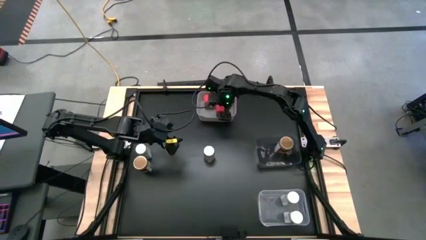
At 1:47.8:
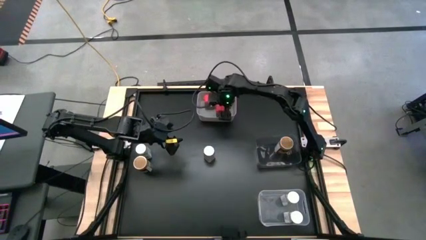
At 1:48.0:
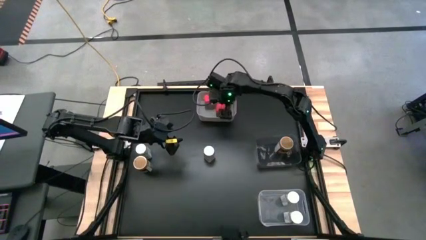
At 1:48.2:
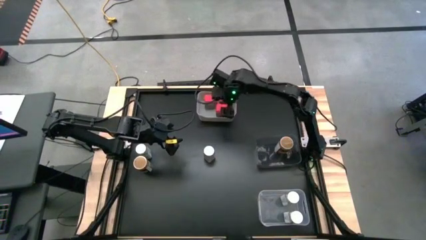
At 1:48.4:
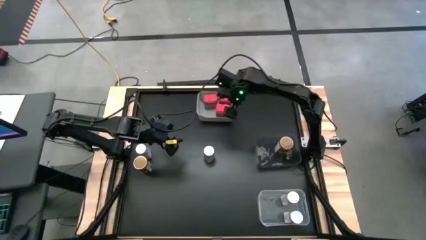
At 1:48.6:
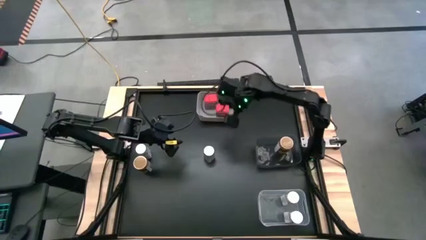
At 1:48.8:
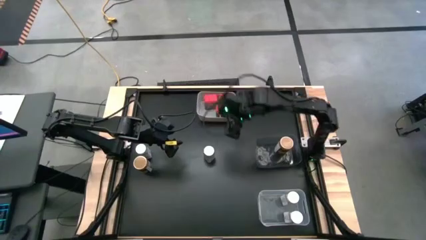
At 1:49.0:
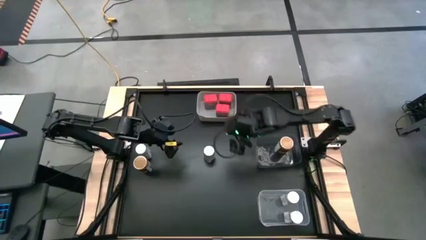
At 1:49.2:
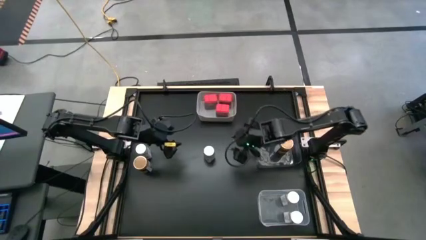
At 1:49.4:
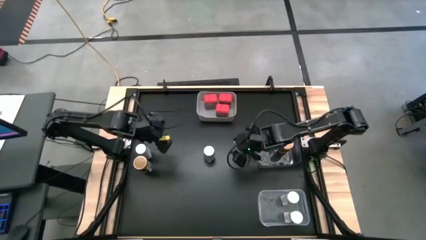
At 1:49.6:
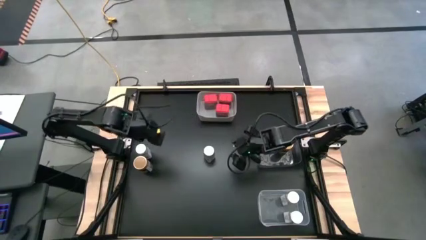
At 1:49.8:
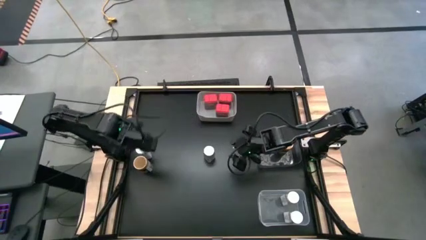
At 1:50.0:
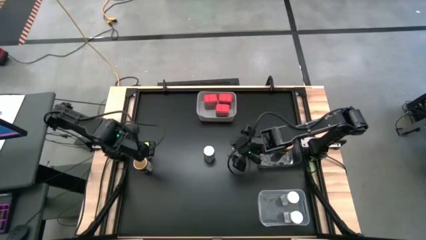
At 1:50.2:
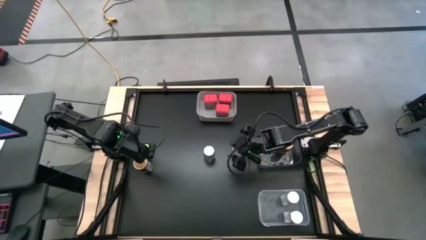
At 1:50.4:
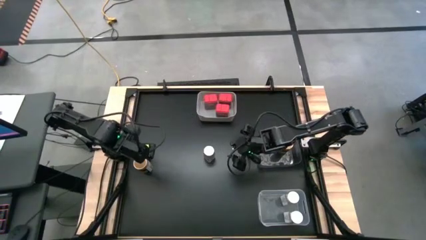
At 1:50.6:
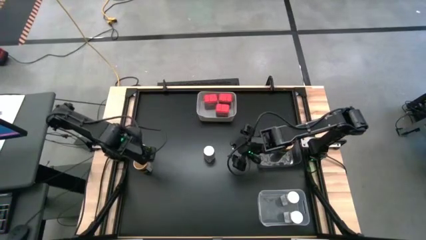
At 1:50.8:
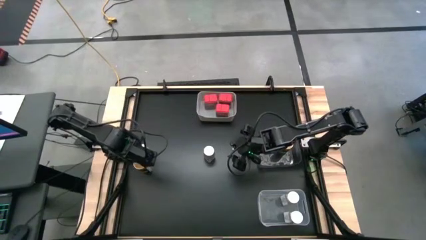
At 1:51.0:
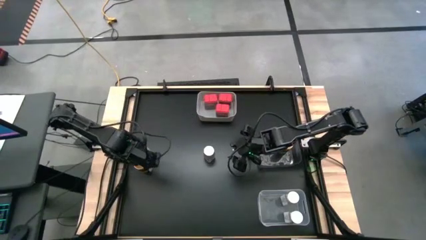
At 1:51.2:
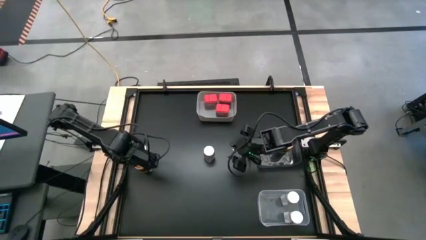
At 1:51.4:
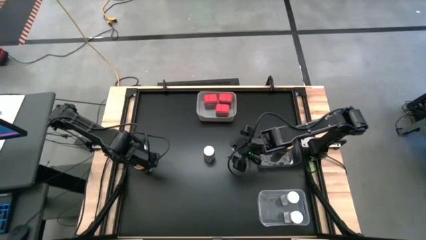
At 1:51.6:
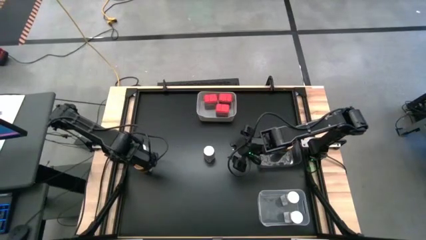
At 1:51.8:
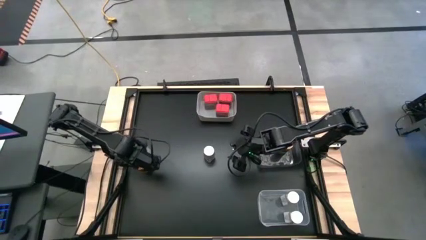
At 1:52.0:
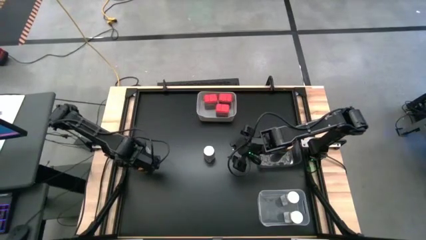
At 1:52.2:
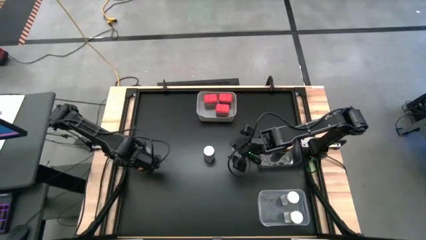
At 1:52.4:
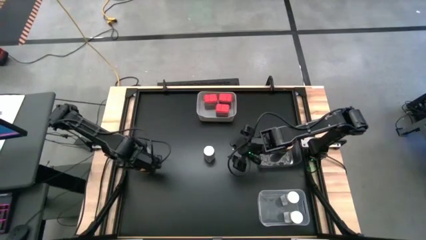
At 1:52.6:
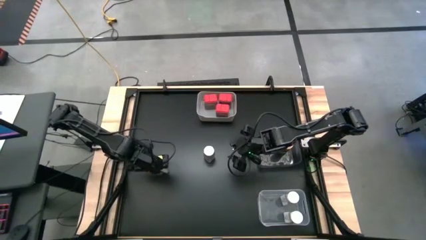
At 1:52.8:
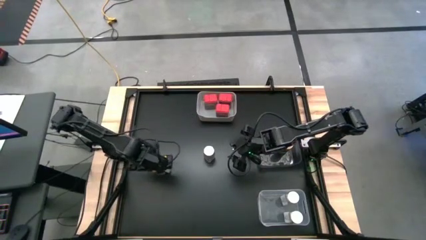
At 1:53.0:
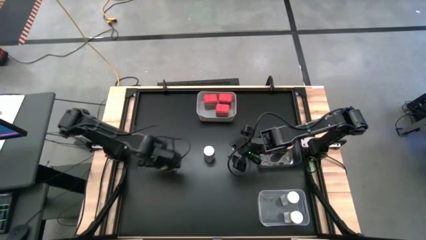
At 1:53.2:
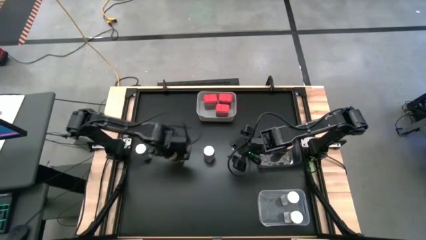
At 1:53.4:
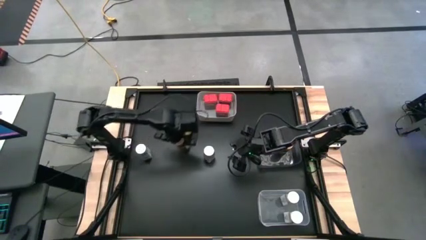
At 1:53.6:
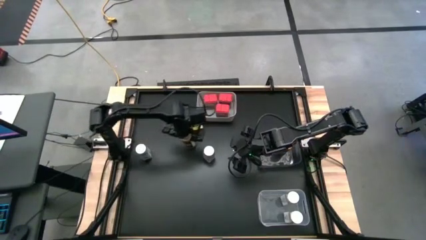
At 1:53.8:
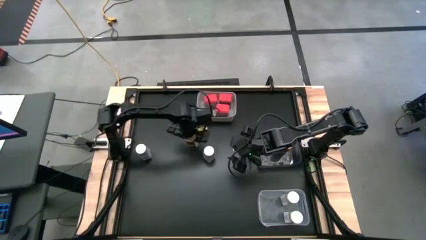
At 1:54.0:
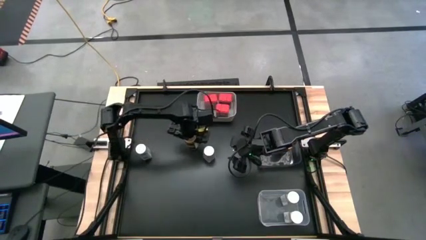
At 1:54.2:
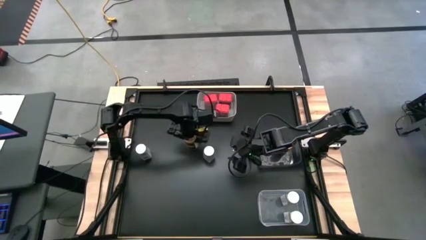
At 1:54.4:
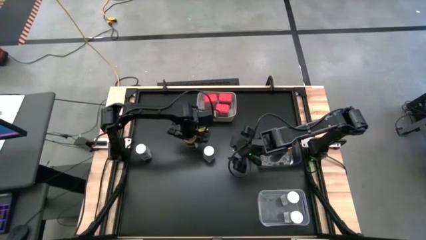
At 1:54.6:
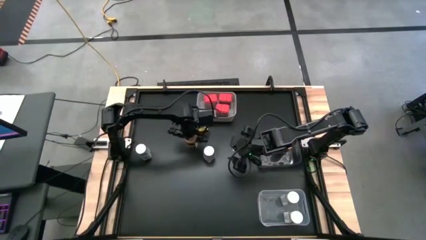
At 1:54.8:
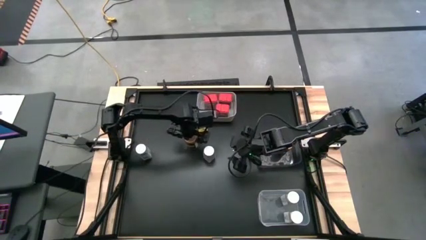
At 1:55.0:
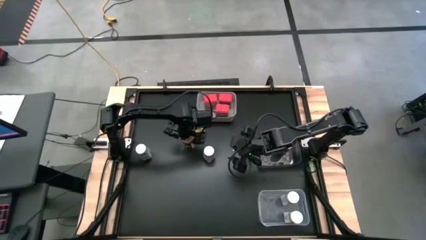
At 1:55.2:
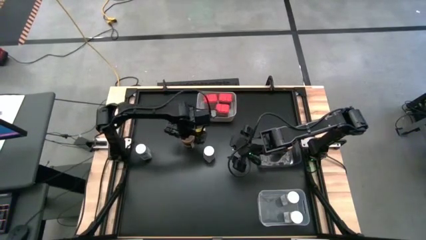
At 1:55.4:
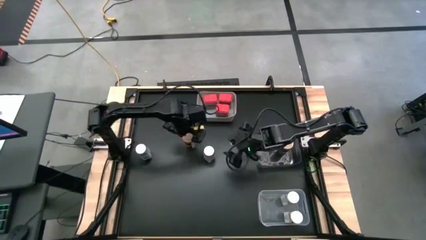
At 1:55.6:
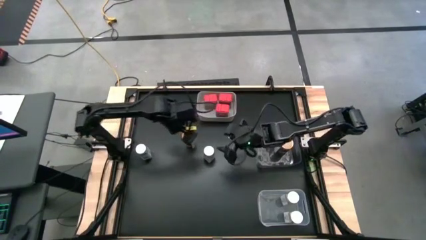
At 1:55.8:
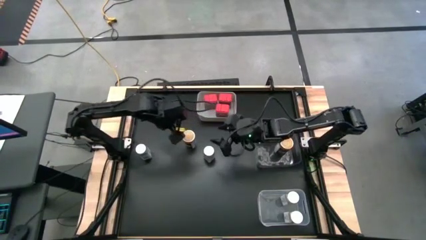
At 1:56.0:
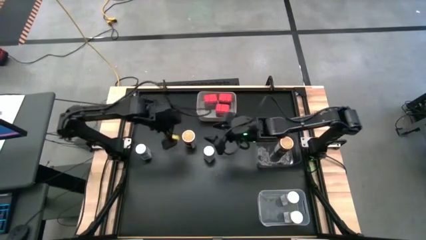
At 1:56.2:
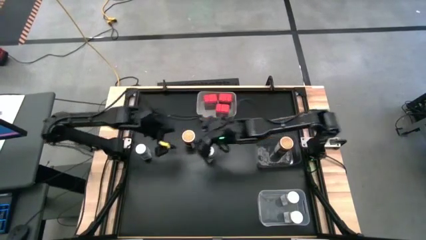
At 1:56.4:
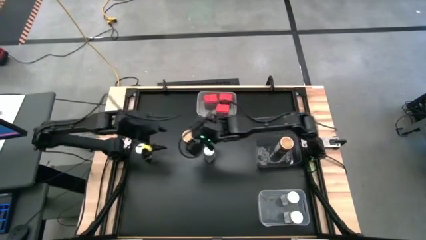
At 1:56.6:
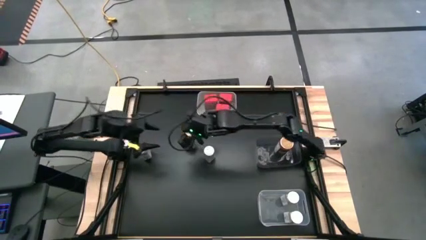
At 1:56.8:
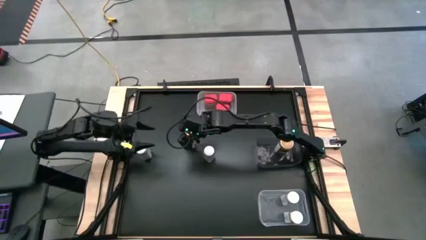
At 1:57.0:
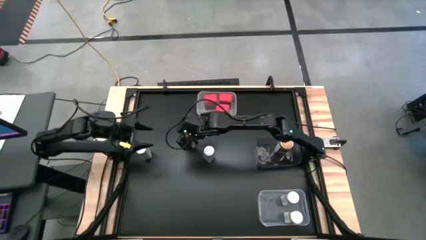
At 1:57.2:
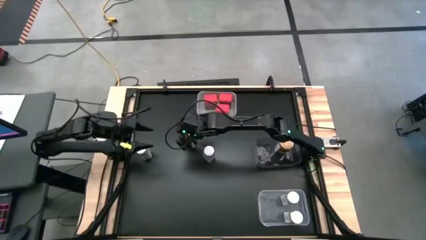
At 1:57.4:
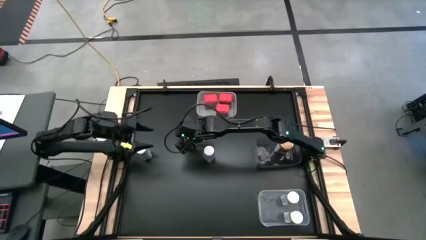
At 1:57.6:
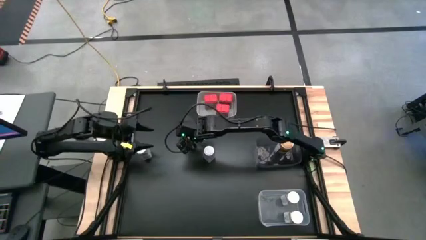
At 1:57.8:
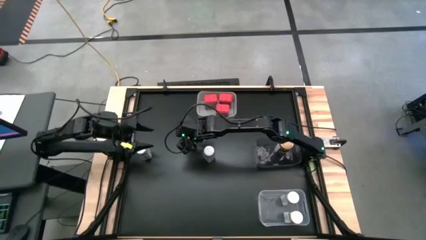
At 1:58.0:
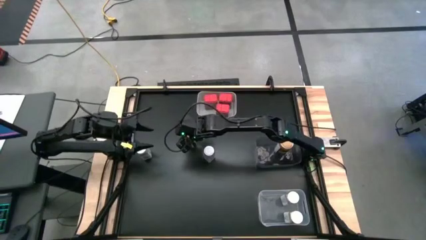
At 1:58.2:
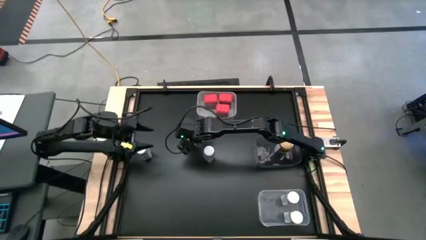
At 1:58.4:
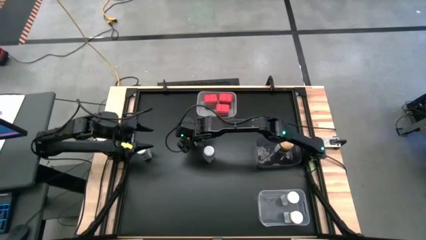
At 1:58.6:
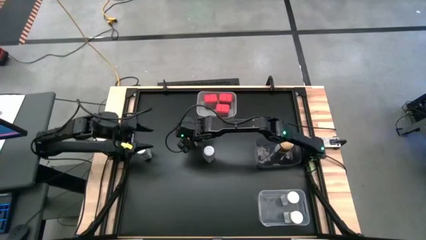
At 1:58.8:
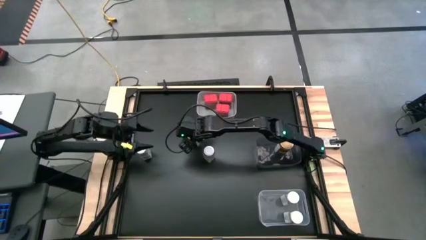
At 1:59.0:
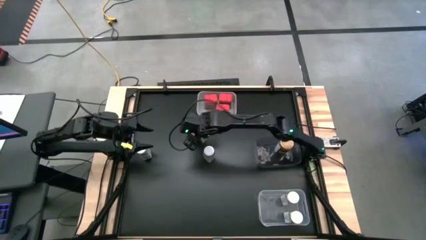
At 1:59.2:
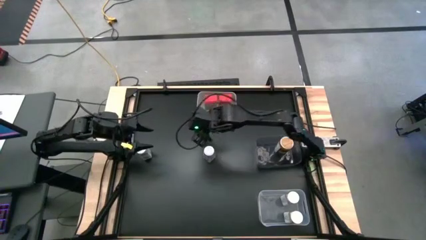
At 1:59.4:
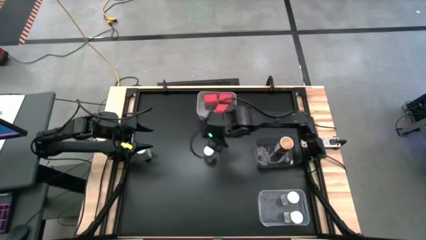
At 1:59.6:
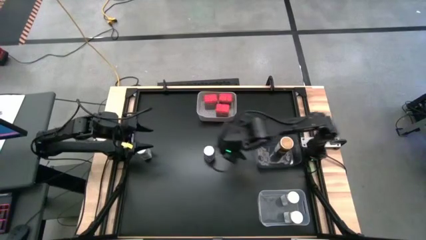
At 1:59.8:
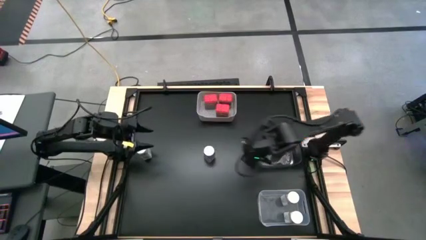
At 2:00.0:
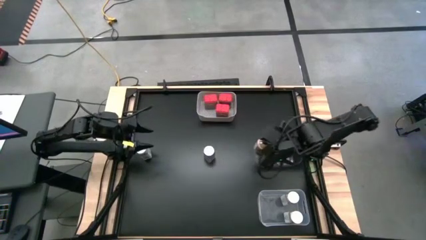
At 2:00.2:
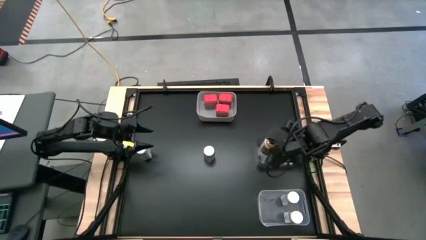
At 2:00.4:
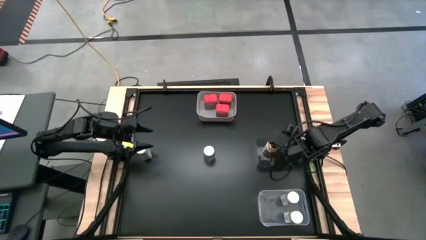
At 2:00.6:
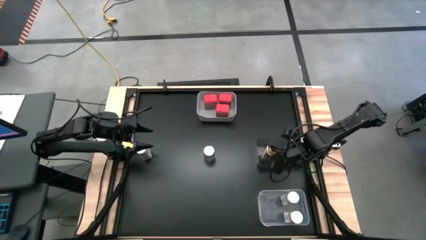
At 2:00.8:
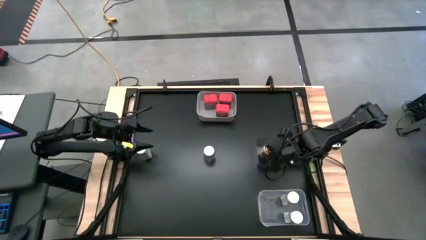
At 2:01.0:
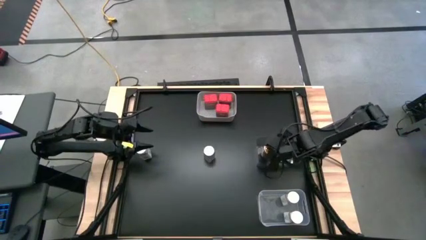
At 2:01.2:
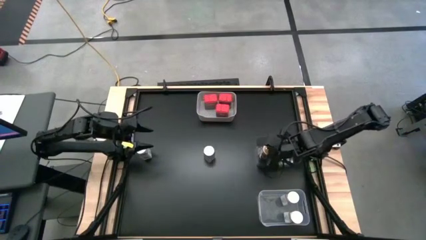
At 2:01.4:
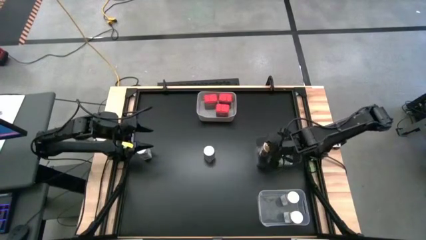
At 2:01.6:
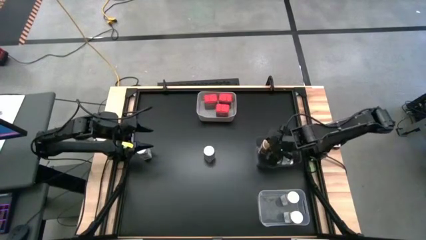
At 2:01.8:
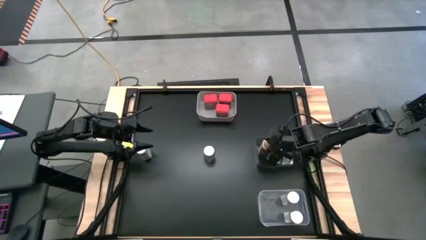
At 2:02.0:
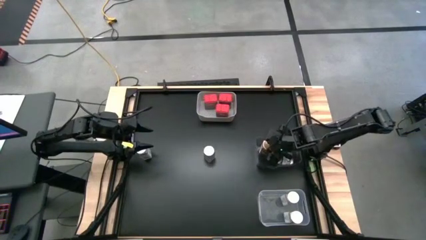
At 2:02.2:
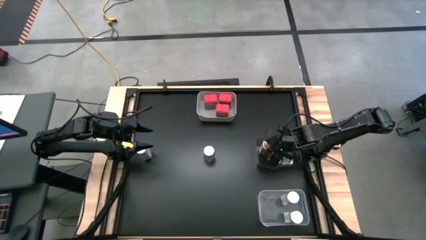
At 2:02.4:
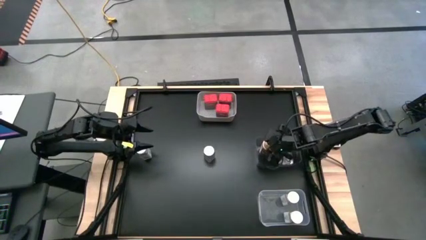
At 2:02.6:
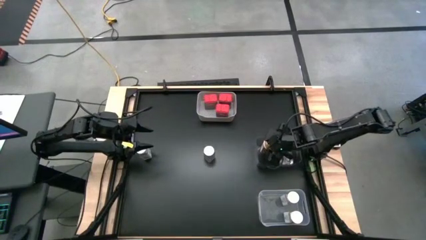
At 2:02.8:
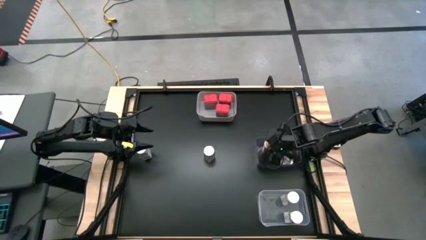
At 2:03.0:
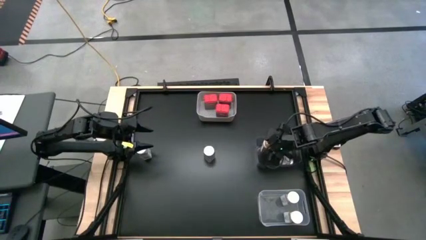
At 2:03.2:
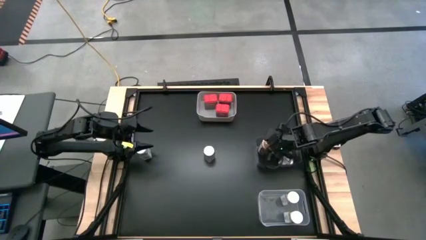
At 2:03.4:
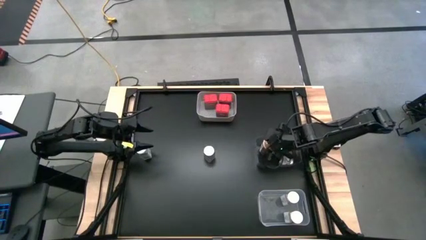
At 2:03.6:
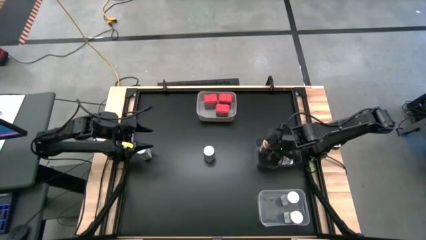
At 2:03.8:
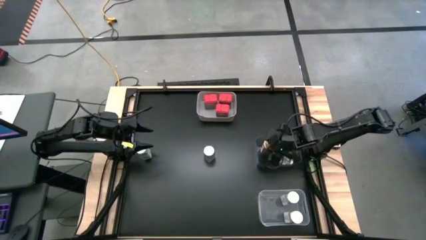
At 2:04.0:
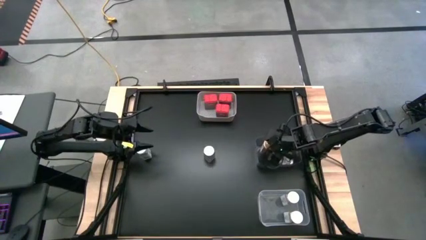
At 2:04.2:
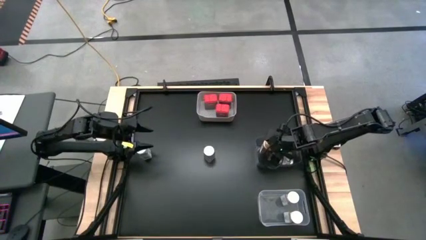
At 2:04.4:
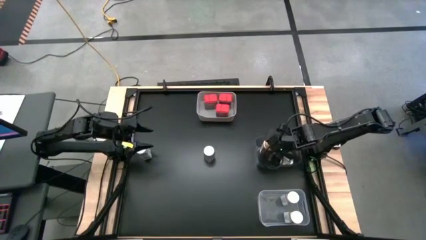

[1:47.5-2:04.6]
Task: Sort spices by type
Put the golden seasoning bottle into the black bin
